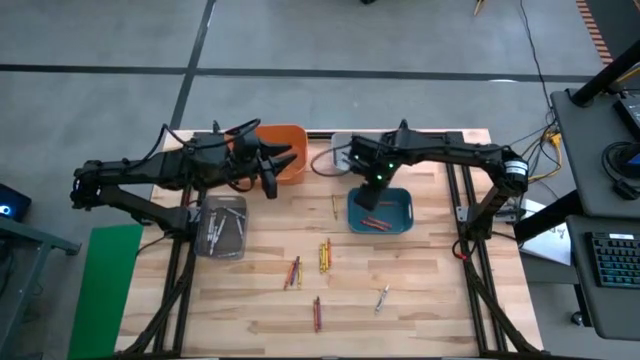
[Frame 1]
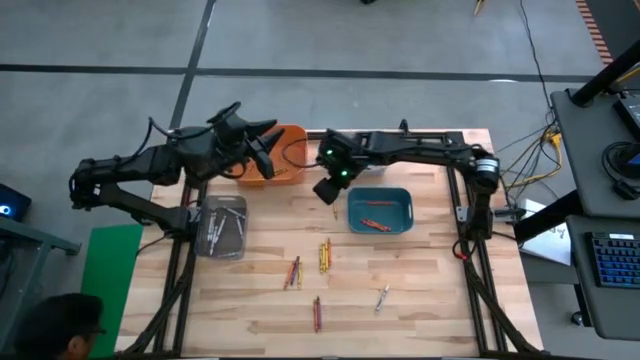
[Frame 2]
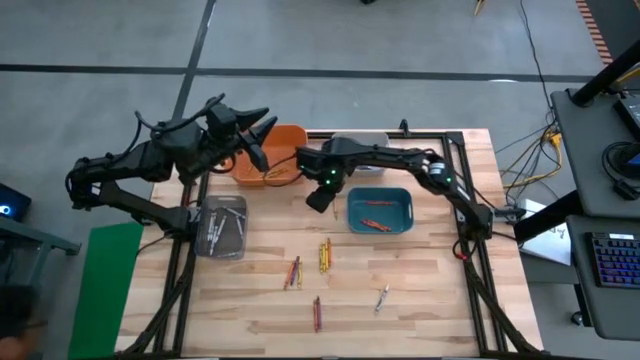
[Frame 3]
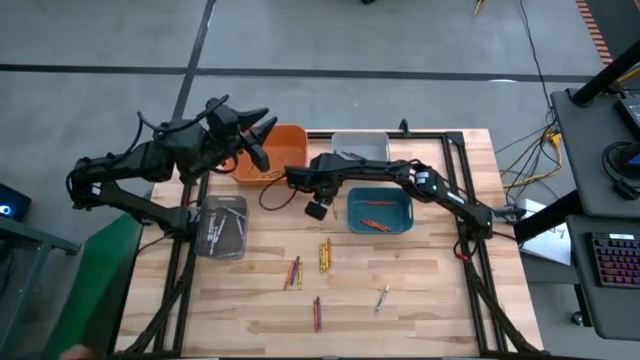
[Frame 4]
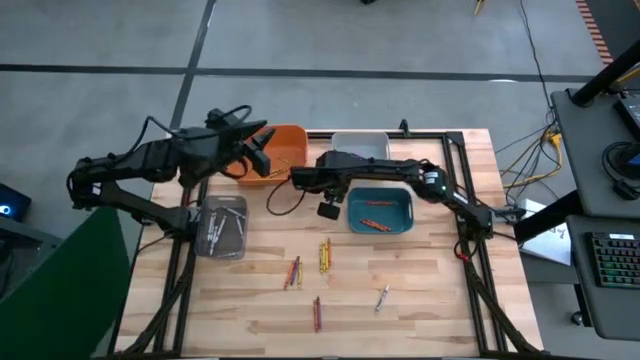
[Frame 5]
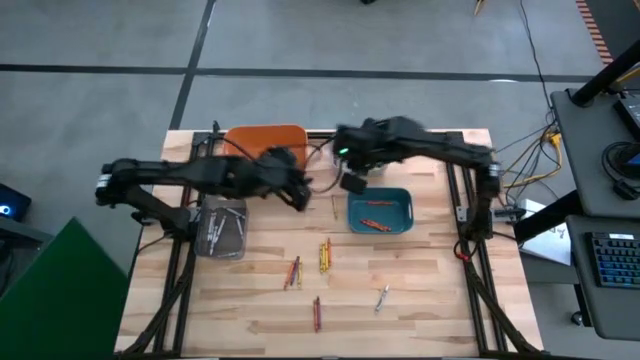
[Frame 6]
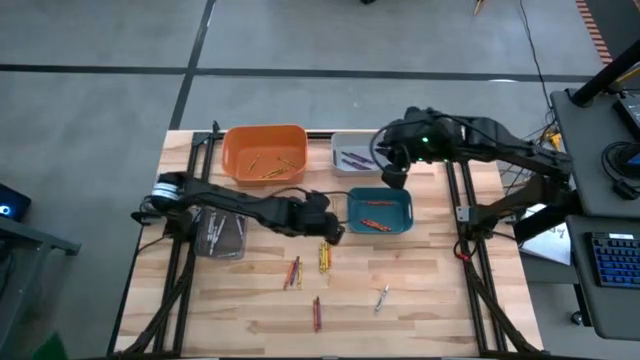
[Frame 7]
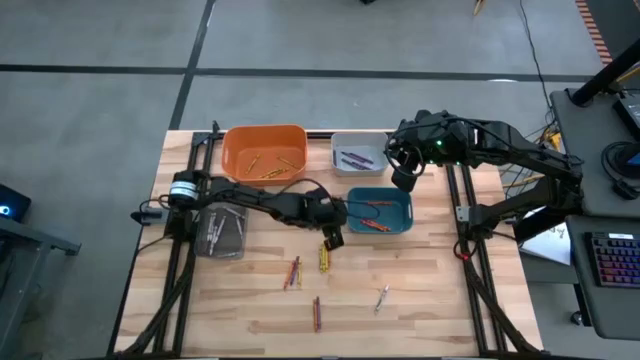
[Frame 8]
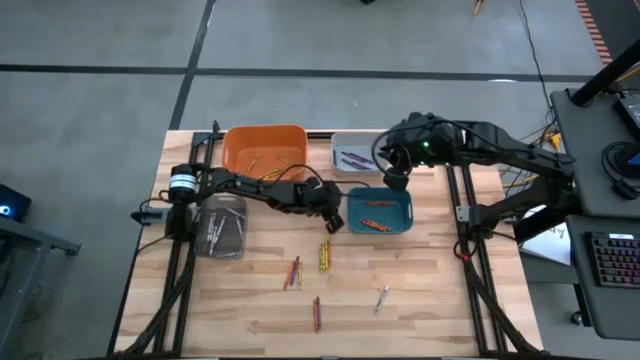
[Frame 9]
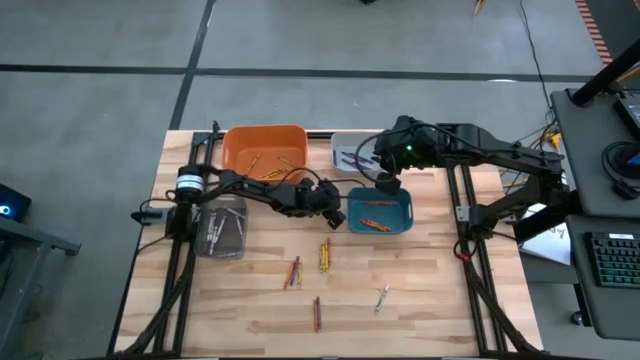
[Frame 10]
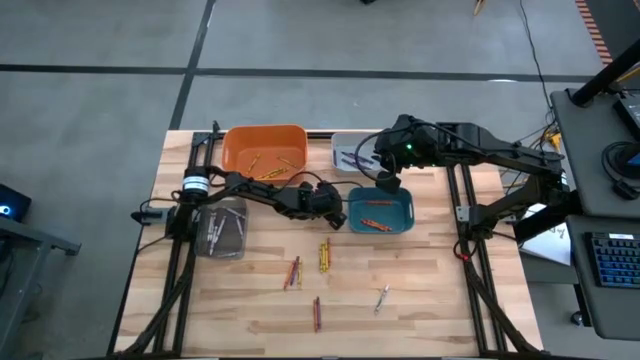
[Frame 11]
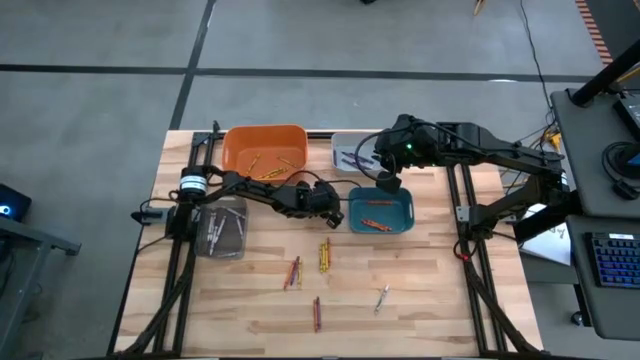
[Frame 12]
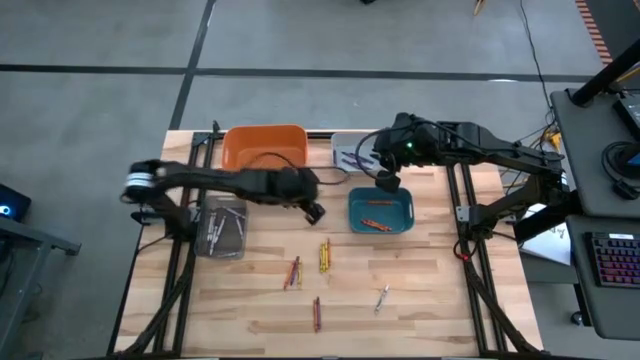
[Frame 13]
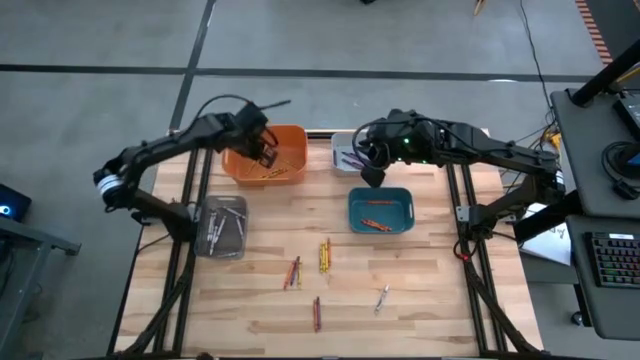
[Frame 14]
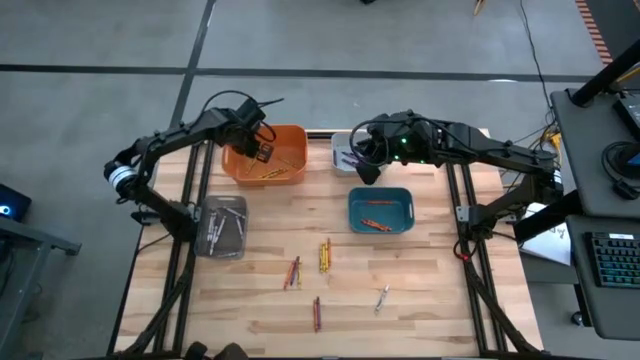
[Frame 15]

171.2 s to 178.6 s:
Task: Sort crayons
Put the yellow crayon into the orange bin

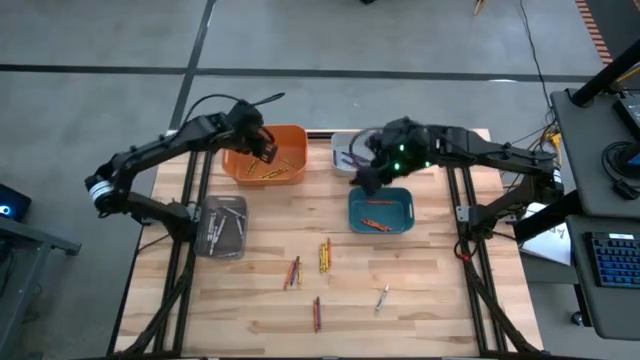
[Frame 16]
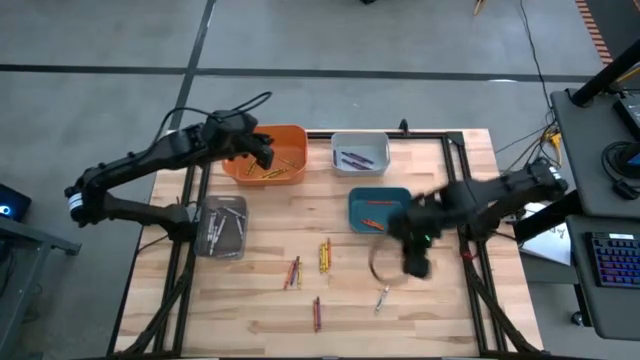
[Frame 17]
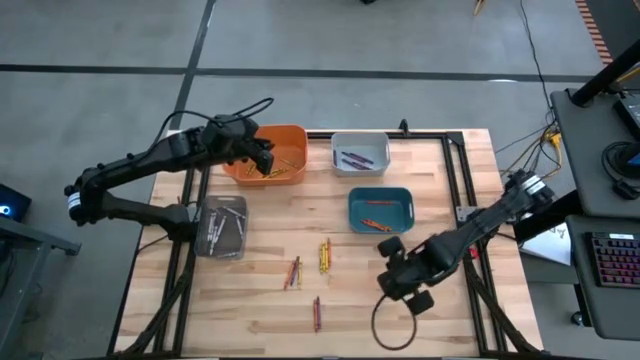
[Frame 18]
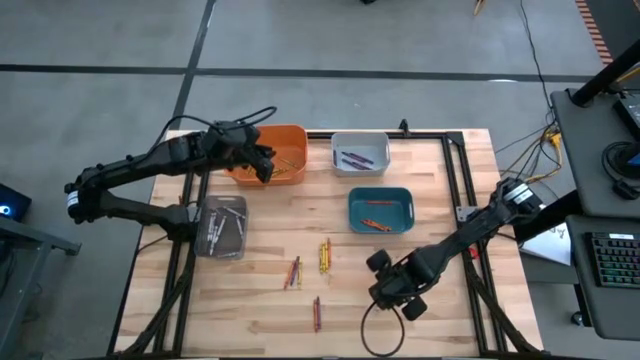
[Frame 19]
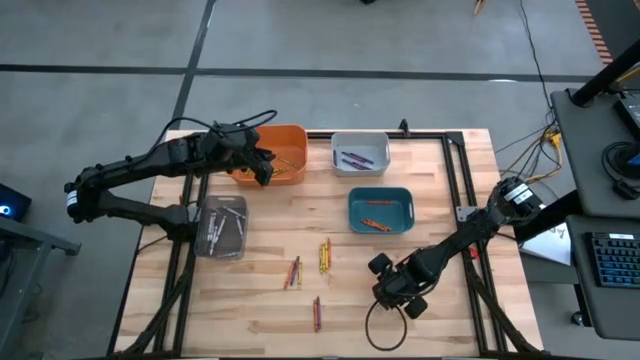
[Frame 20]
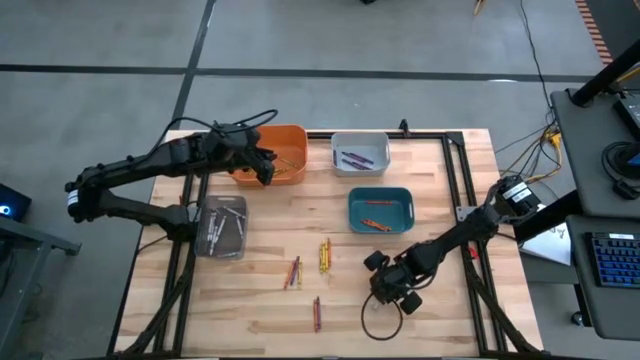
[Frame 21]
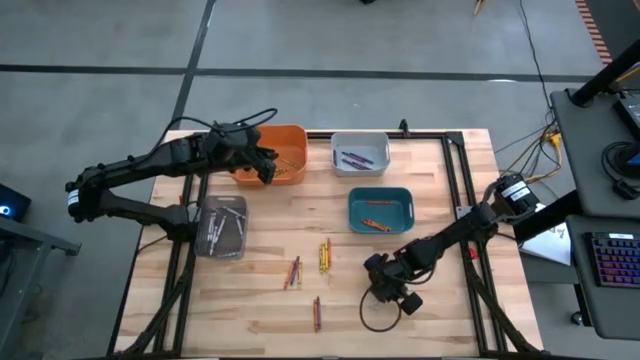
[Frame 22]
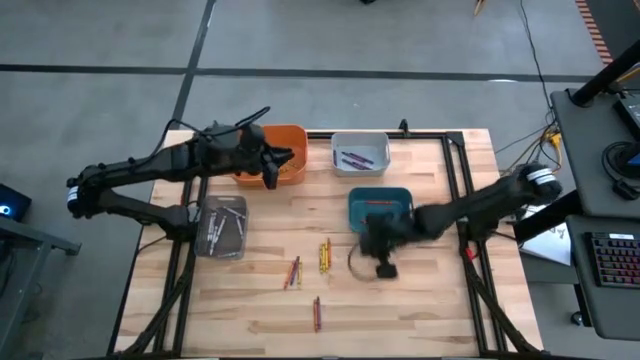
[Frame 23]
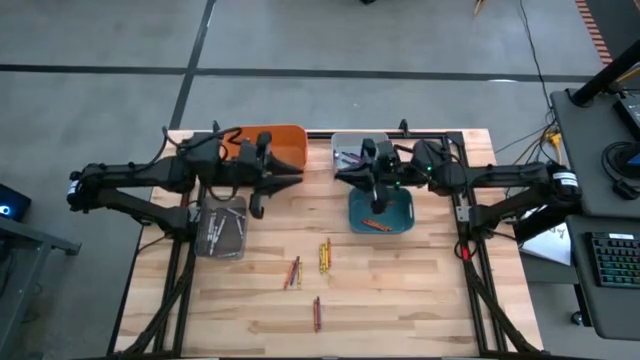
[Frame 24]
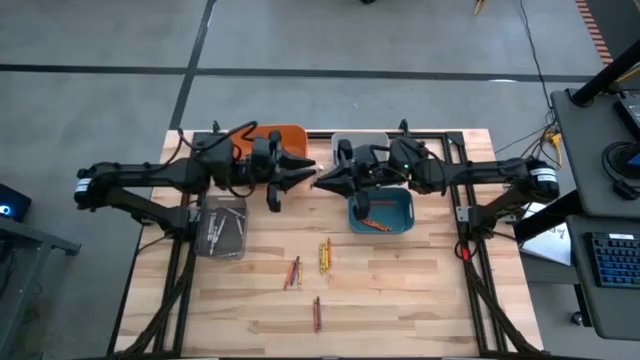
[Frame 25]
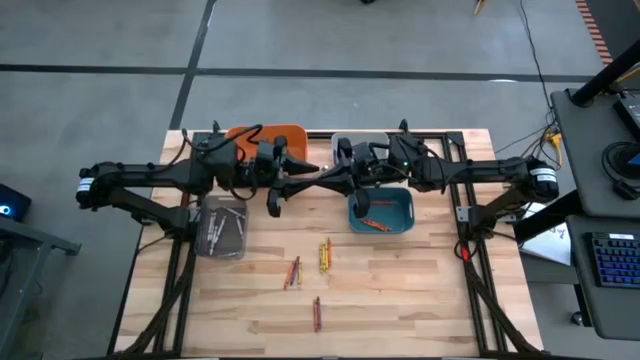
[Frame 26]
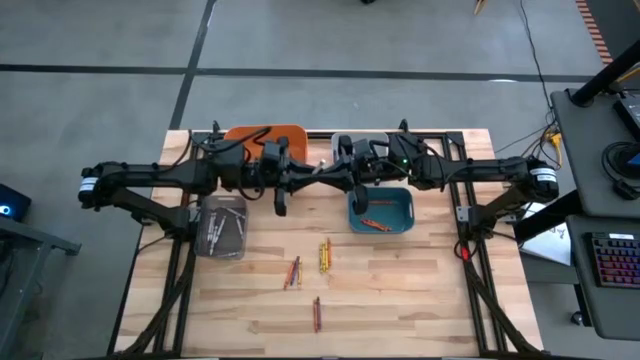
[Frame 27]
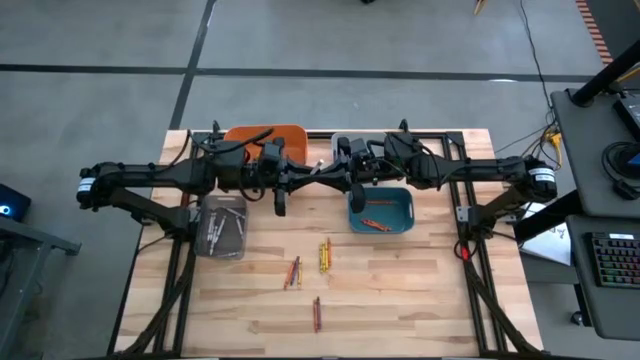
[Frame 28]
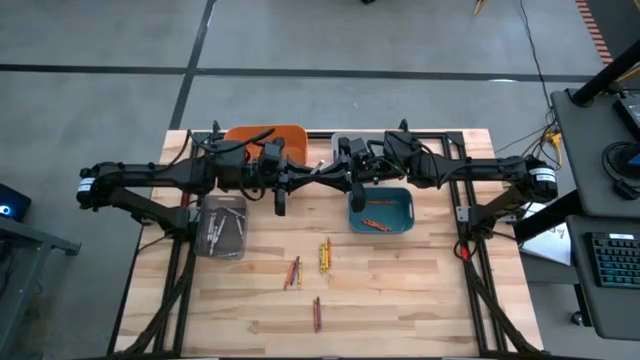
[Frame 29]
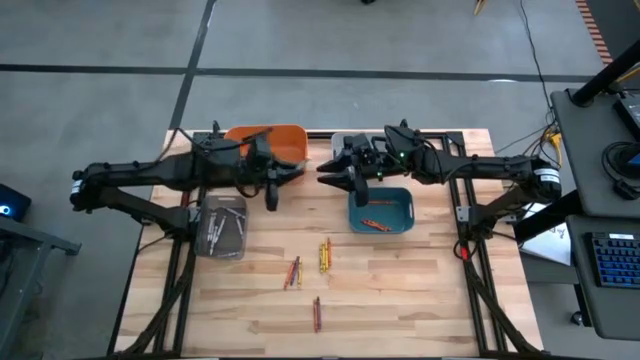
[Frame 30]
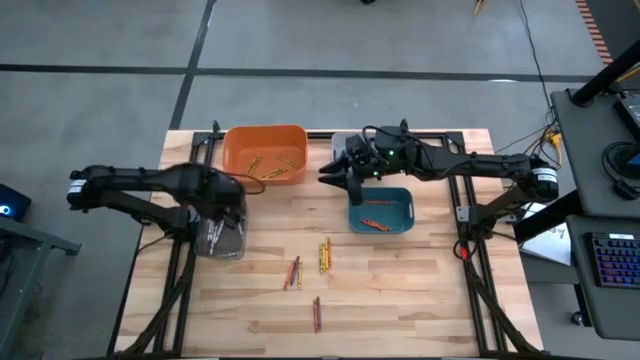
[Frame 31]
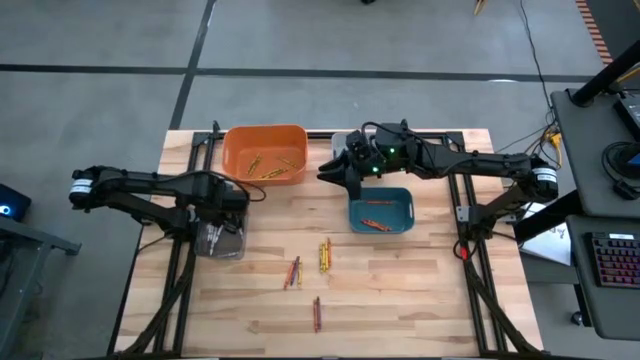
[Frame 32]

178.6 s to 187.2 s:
Put the white crayon into the black bin

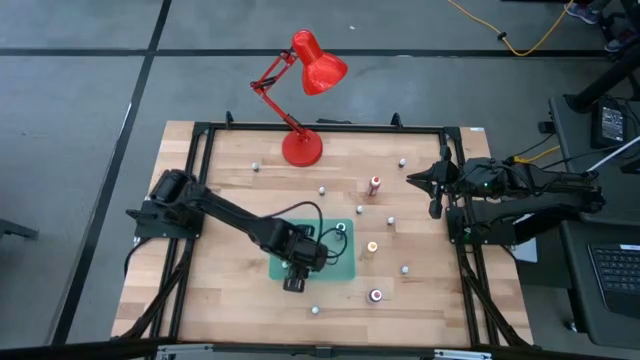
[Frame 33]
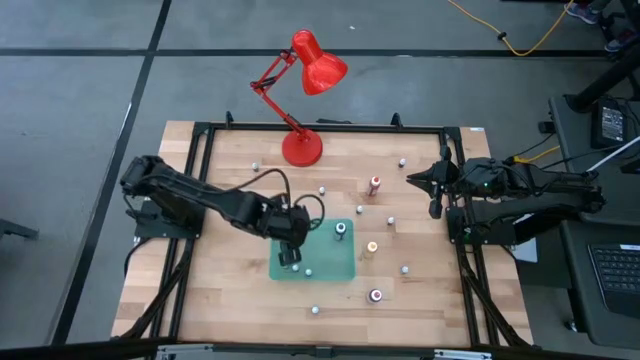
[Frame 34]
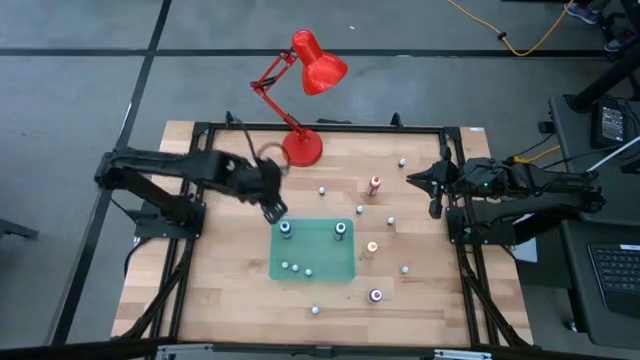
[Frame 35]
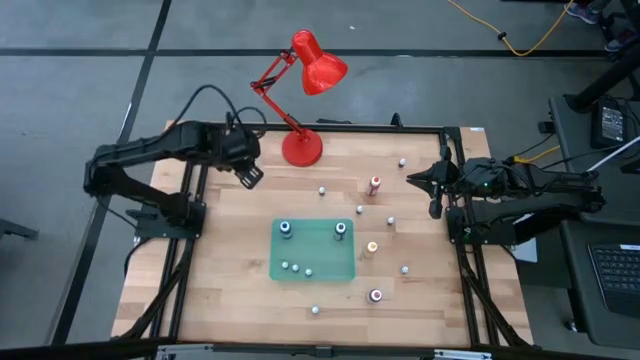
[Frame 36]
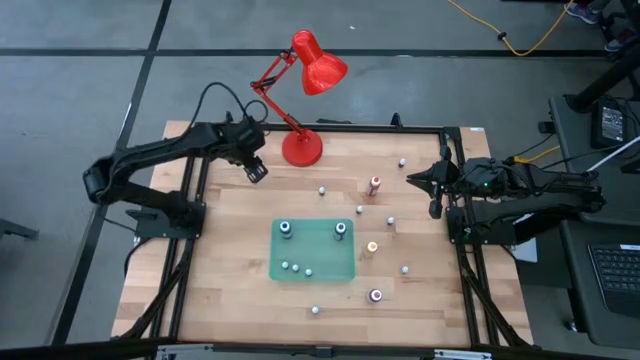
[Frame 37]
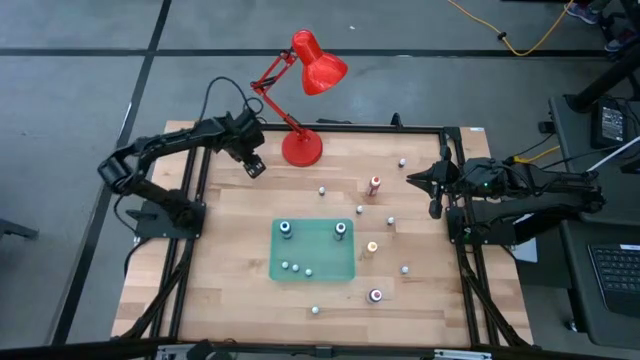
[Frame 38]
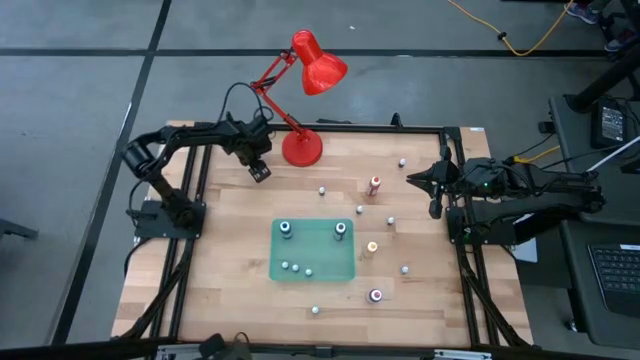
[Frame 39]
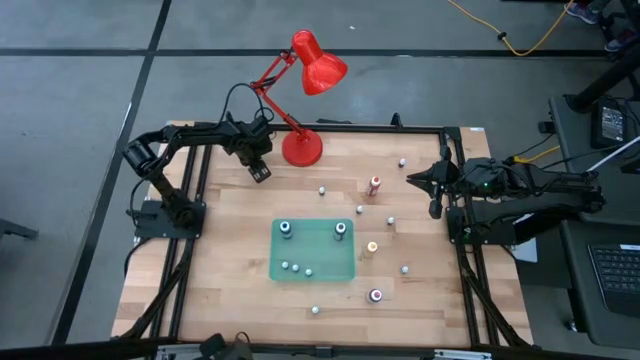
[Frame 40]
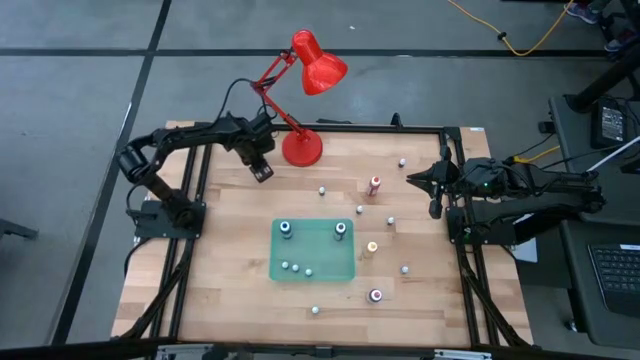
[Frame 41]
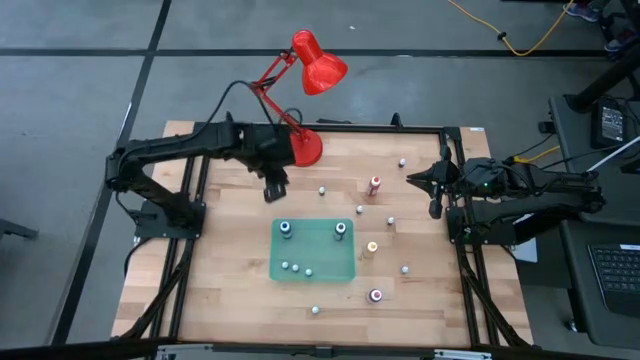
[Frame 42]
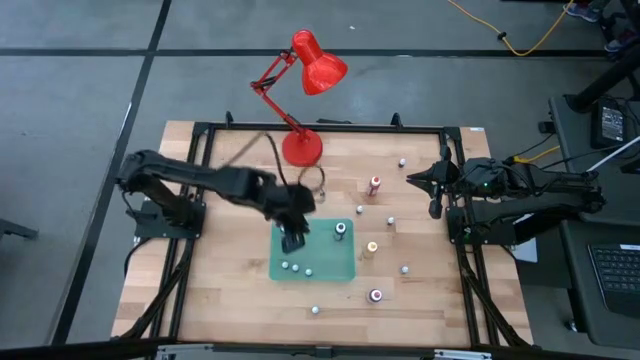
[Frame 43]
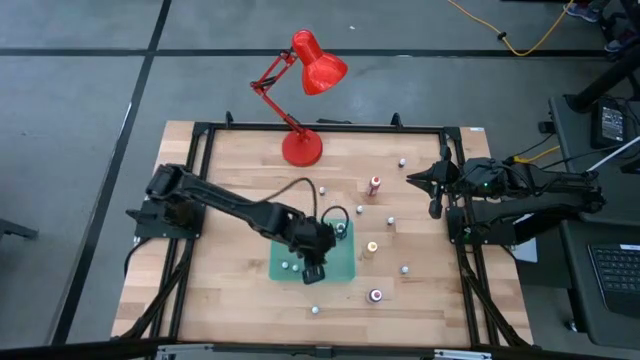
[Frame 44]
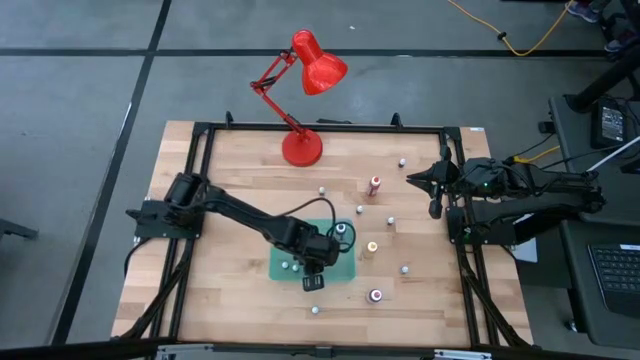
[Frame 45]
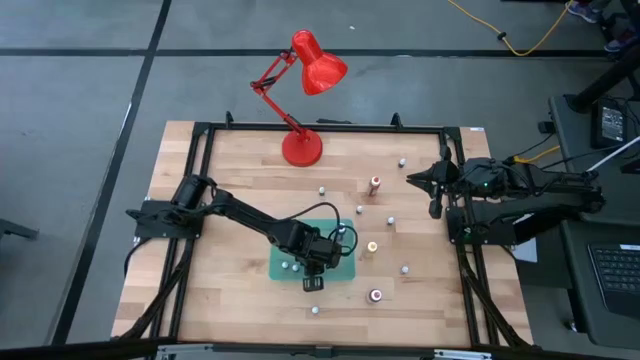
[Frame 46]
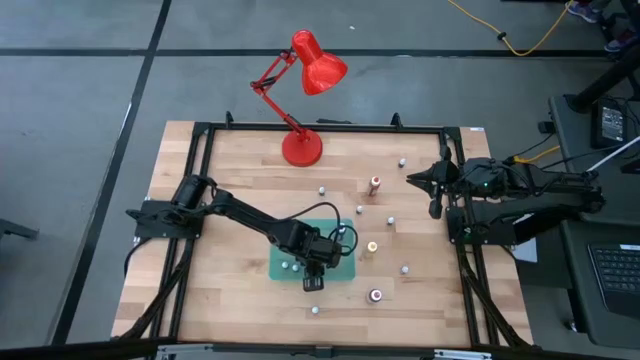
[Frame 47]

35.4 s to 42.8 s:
Task: Pick & Place food coloring
Put the small black bottle into the green bin
